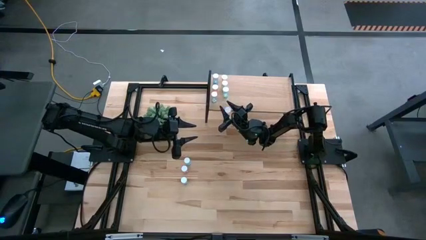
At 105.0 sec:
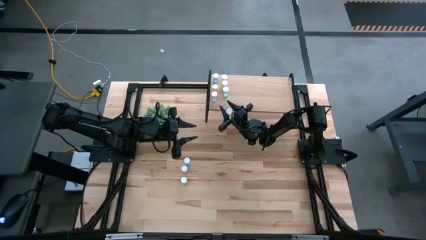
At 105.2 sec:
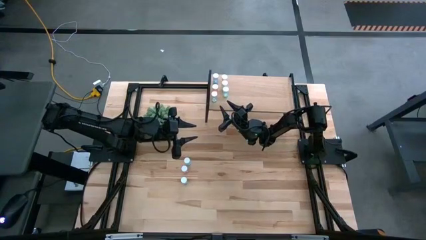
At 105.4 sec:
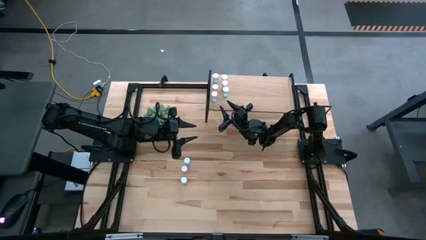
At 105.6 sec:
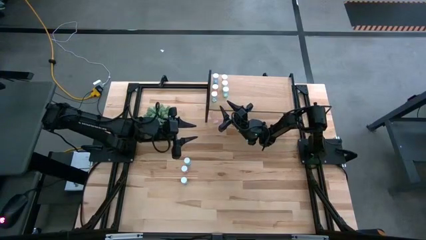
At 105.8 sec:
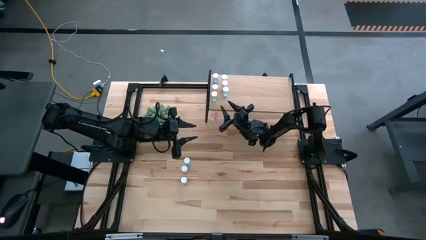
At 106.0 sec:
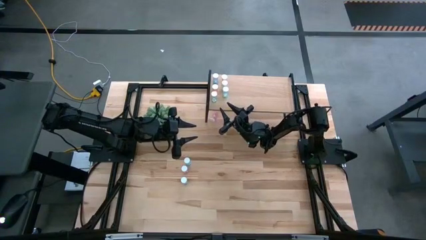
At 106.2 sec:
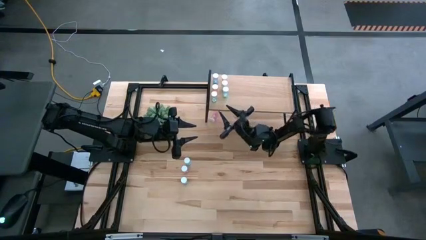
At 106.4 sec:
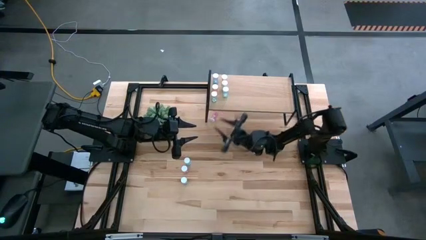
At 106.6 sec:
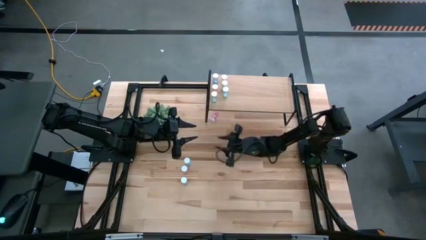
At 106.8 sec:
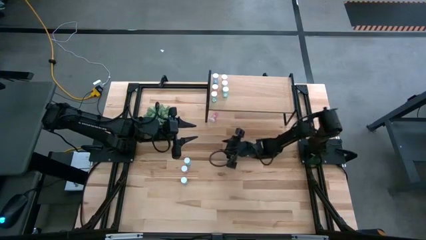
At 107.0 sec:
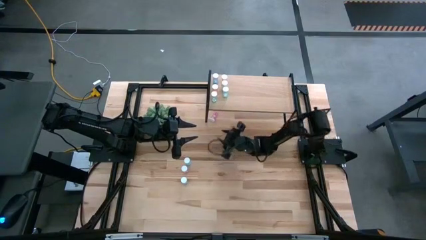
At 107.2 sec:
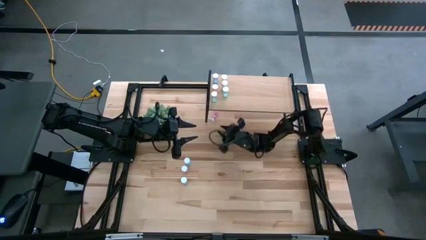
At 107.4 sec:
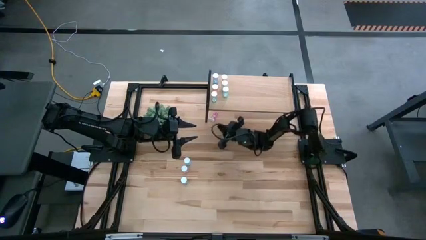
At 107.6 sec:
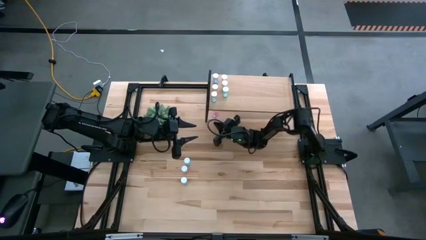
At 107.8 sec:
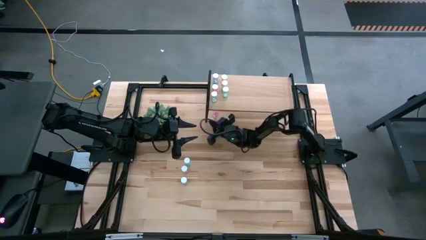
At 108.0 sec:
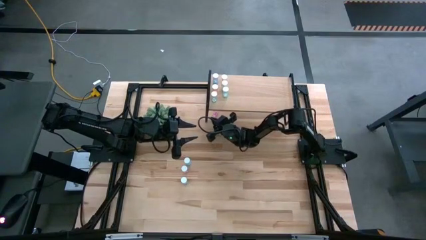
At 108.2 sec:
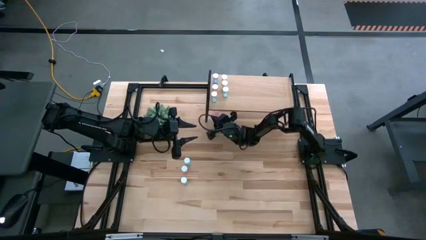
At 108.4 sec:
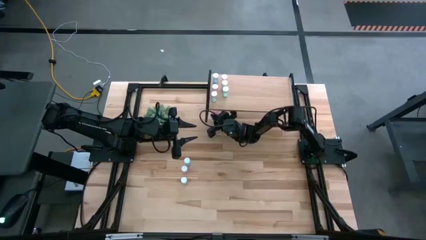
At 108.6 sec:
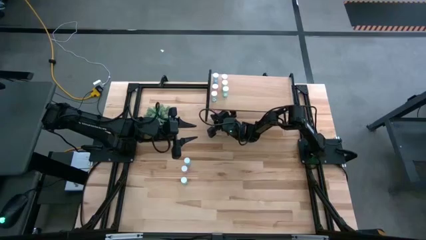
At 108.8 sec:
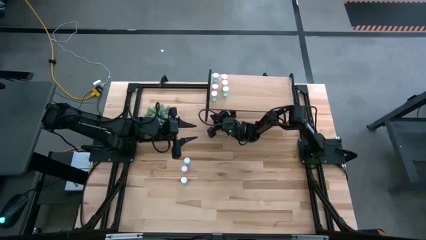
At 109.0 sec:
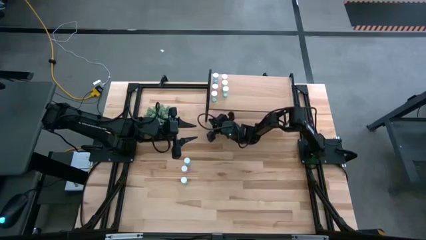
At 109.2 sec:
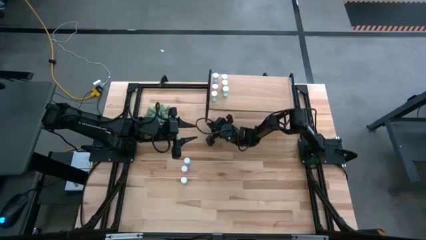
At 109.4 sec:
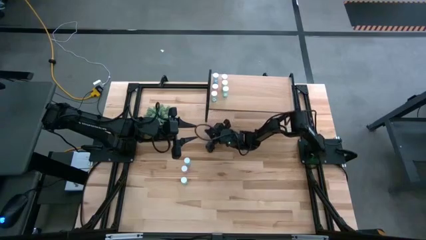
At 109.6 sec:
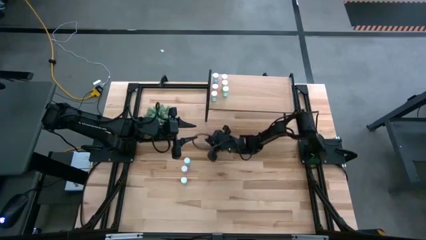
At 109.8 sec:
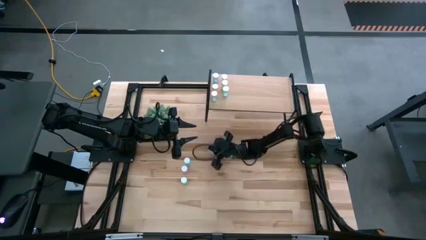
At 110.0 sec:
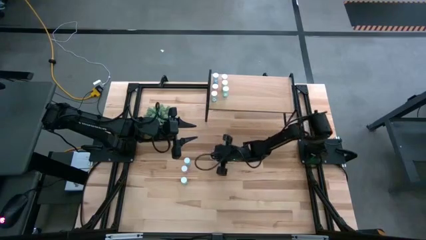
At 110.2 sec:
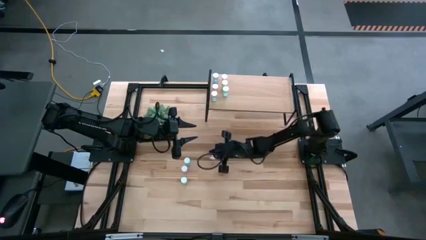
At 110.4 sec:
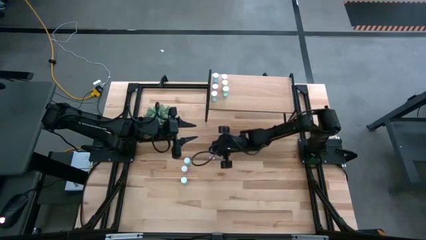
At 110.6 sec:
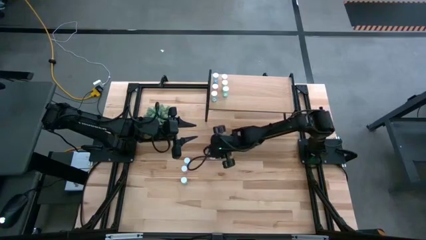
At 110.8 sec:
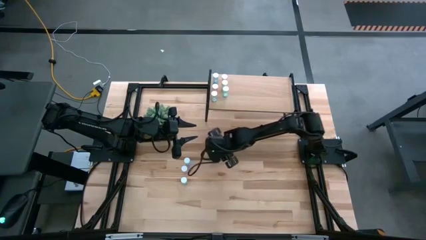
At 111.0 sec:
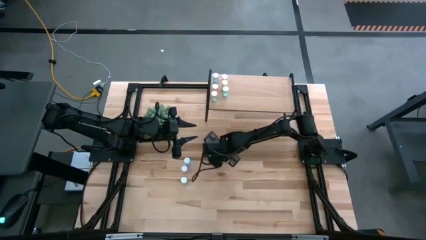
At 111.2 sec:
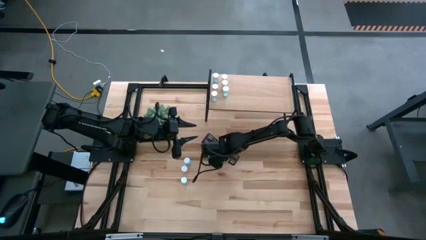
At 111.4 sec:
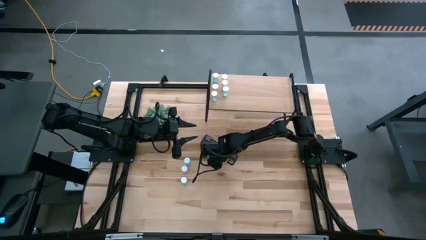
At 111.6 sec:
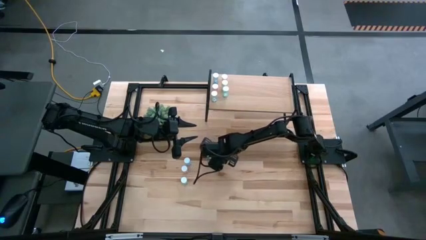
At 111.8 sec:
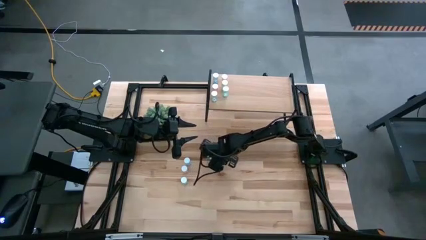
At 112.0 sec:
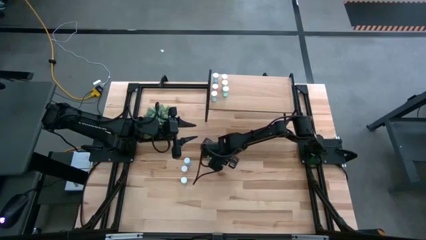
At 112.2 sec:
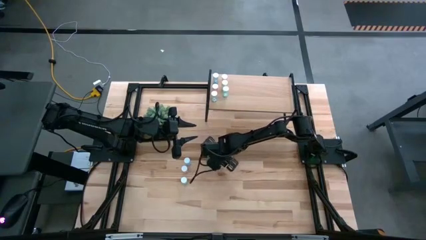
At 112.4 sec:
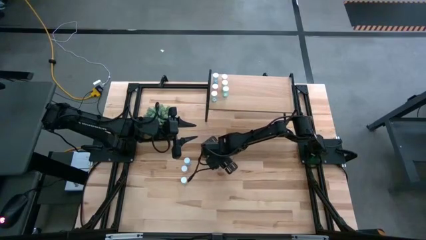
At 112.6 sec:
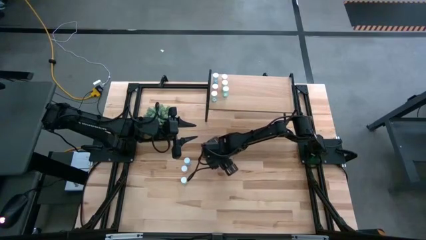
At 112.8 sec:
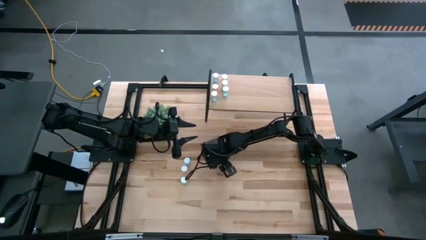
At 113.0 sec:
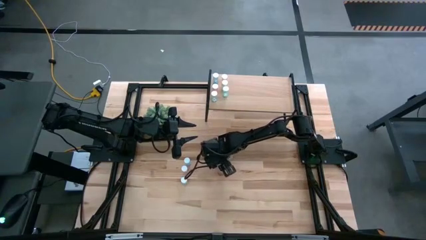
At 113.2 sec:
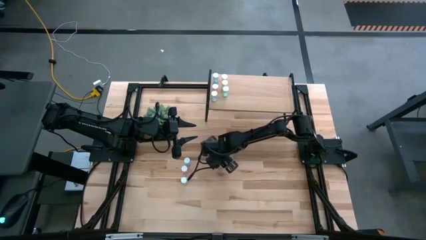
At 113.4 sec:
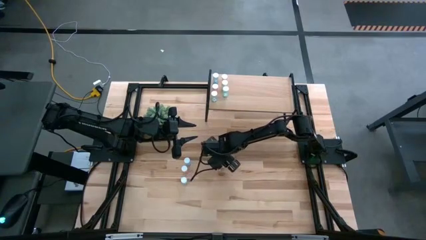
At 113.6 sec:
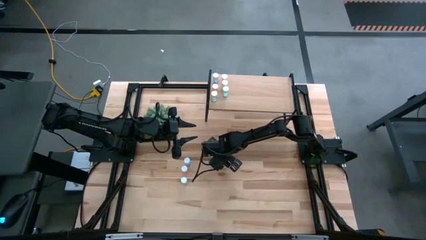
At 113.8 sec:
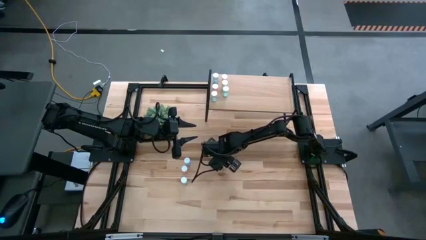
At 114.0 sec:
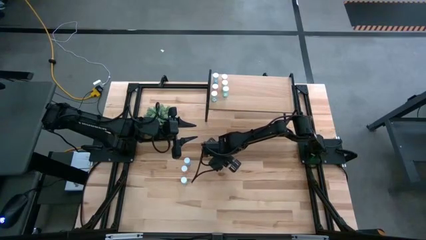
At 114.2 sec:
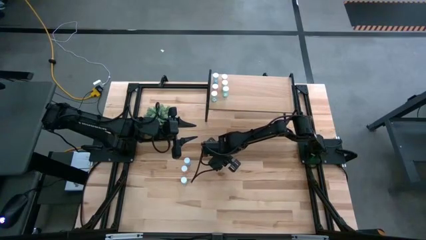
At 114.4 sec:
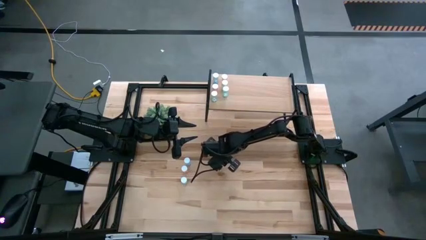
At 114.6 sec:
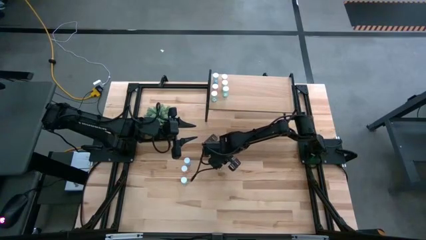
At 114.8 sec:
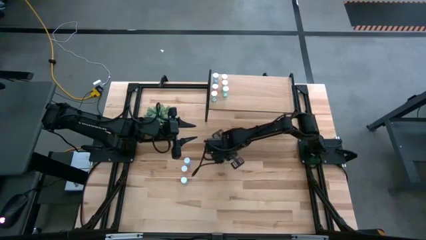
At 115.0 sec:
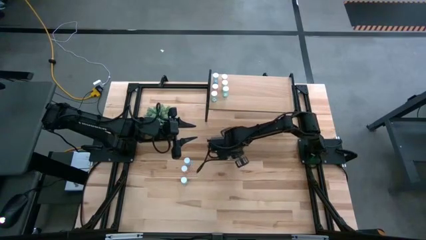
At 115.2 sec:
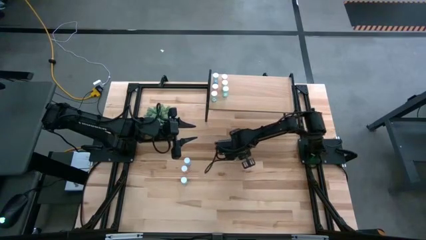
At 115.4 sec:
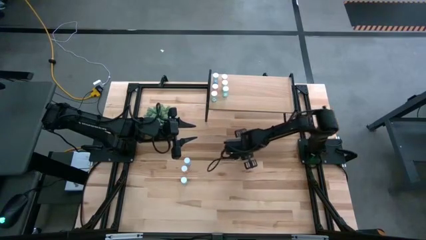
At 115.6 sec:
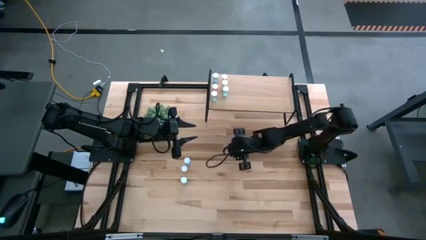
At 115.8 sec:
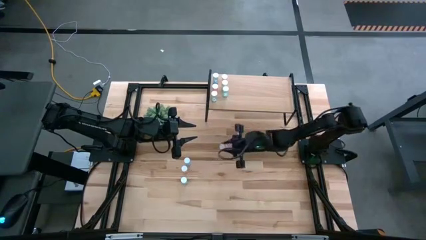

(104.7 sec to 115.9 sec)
Task: Pick and place medicine bottles onto shelf by color
Put the transparent pink medicine bottle on the shelf
